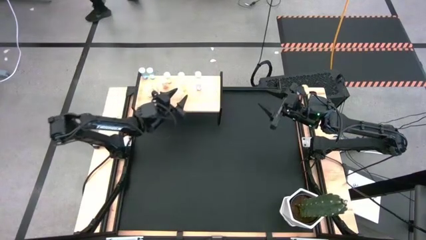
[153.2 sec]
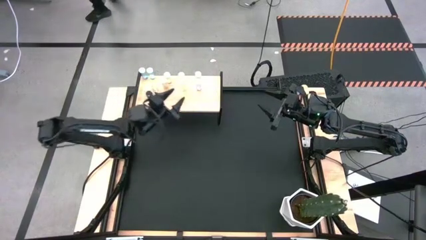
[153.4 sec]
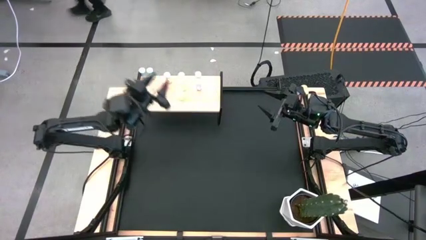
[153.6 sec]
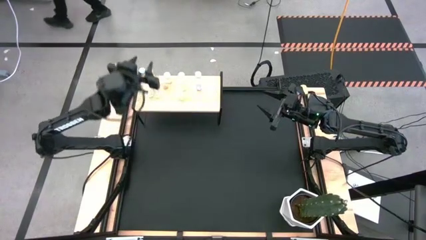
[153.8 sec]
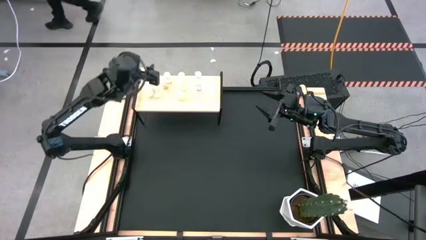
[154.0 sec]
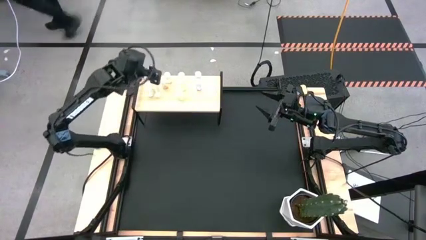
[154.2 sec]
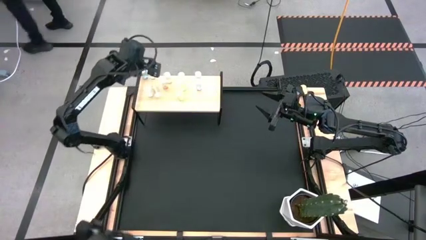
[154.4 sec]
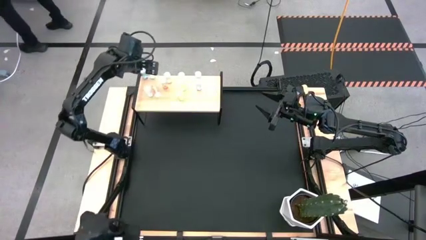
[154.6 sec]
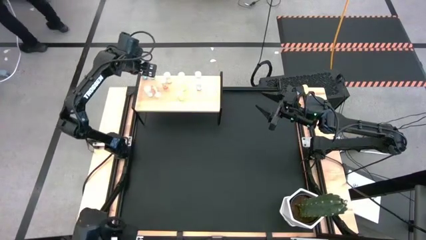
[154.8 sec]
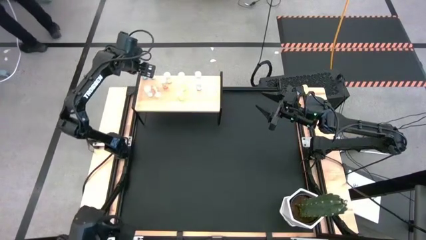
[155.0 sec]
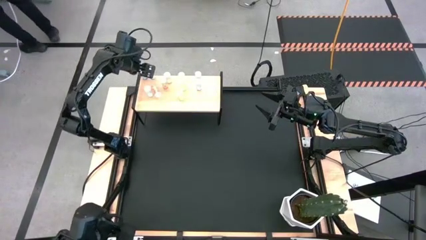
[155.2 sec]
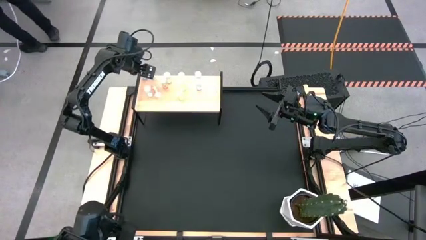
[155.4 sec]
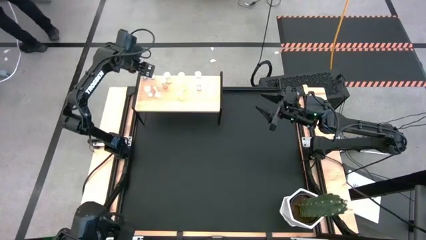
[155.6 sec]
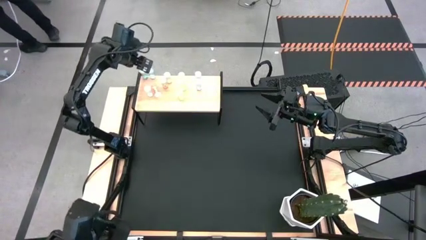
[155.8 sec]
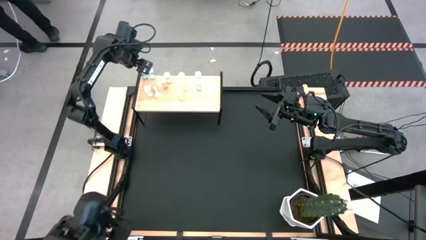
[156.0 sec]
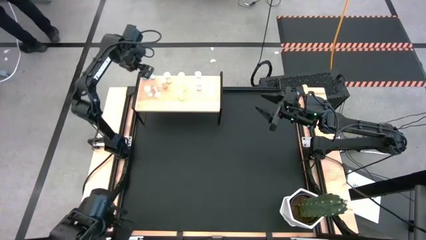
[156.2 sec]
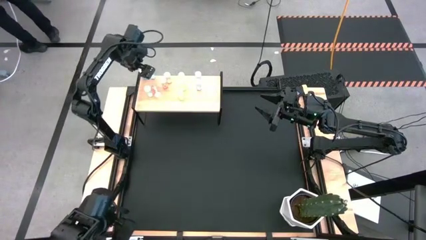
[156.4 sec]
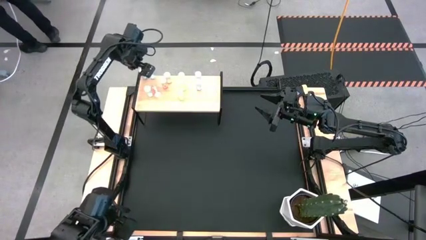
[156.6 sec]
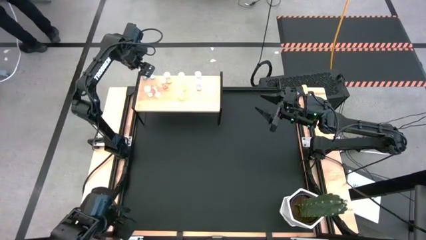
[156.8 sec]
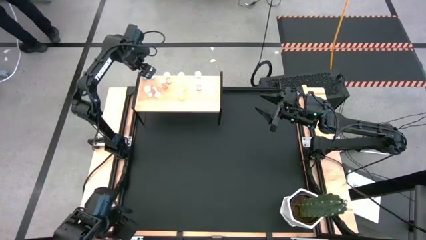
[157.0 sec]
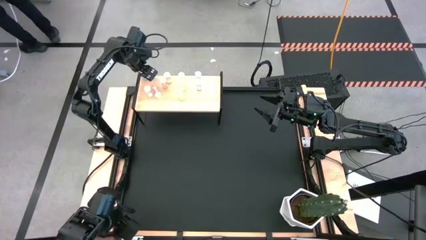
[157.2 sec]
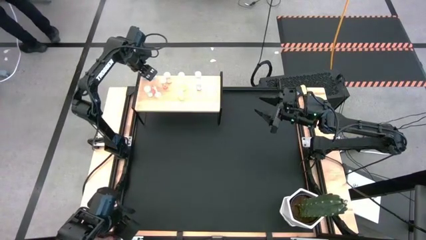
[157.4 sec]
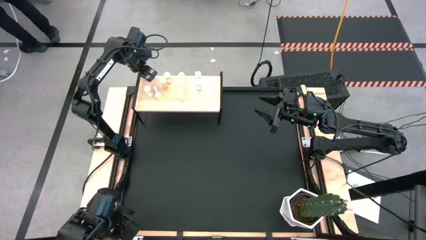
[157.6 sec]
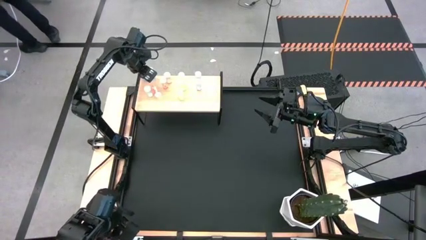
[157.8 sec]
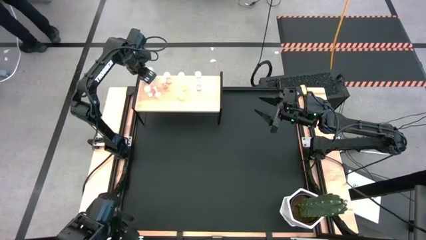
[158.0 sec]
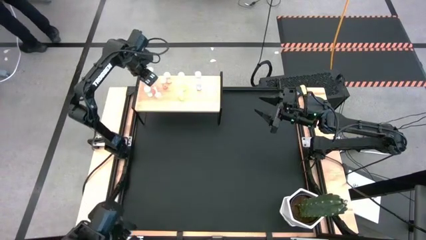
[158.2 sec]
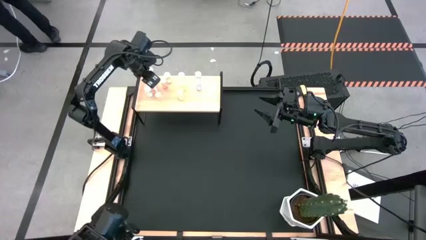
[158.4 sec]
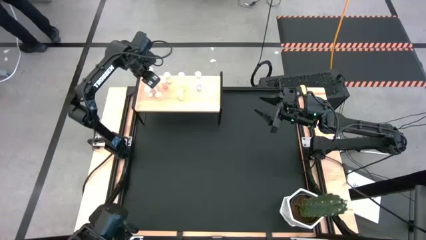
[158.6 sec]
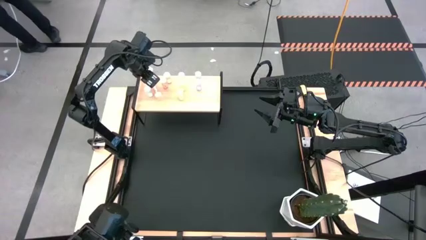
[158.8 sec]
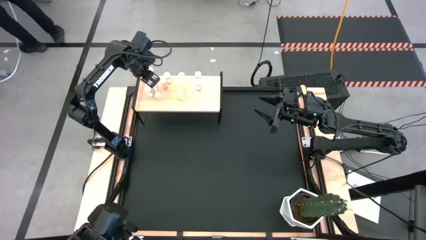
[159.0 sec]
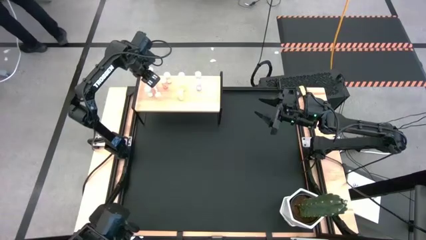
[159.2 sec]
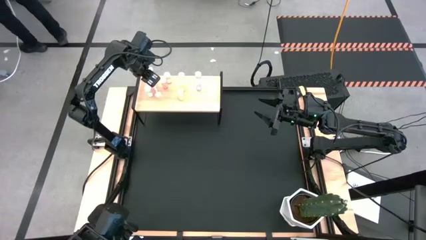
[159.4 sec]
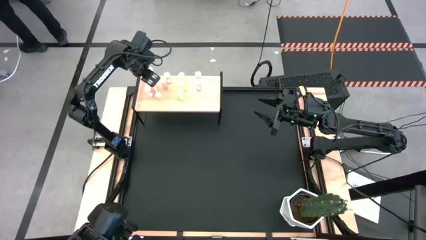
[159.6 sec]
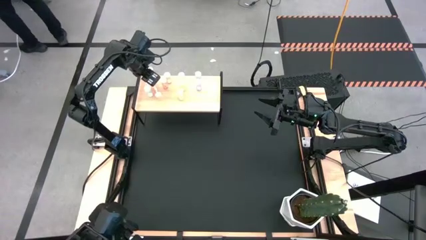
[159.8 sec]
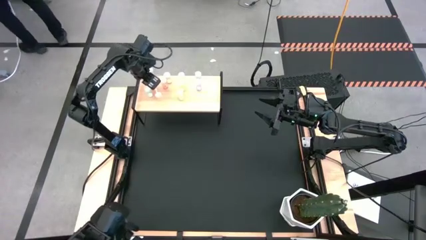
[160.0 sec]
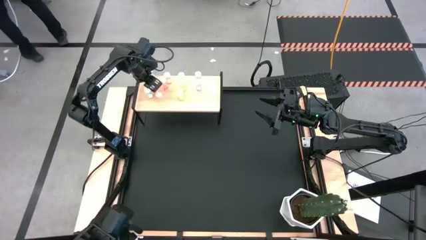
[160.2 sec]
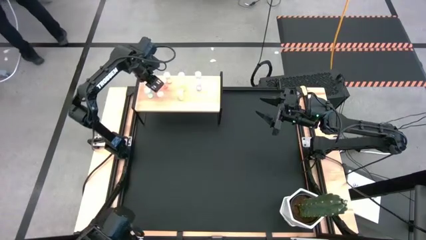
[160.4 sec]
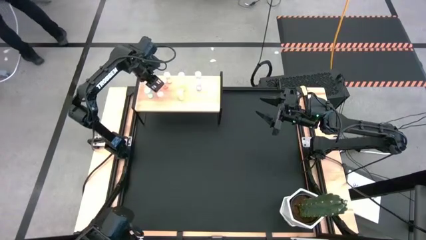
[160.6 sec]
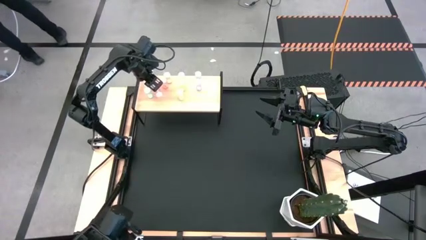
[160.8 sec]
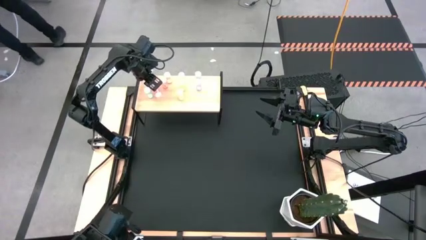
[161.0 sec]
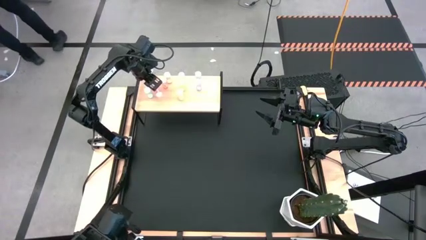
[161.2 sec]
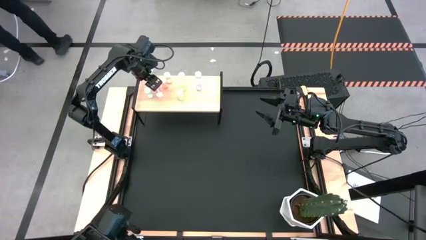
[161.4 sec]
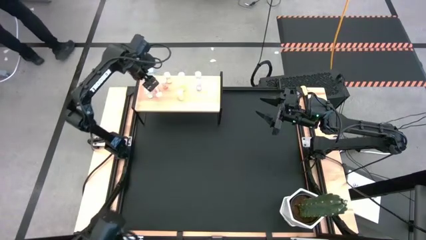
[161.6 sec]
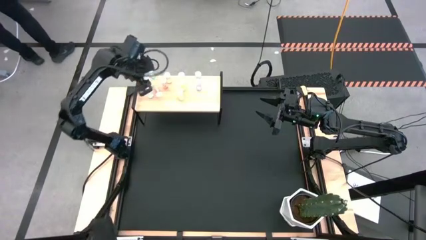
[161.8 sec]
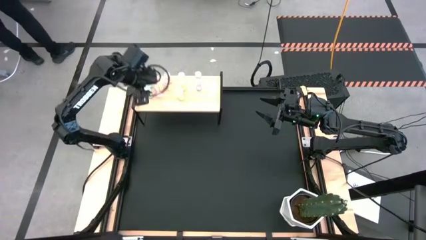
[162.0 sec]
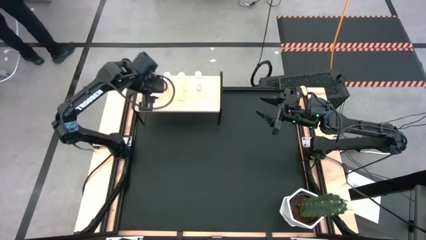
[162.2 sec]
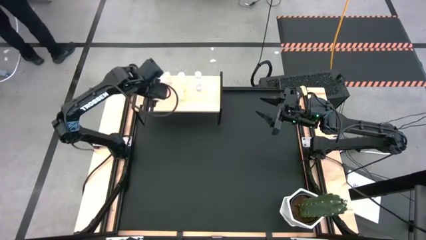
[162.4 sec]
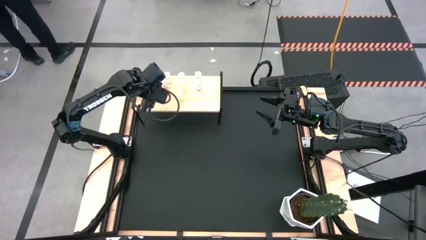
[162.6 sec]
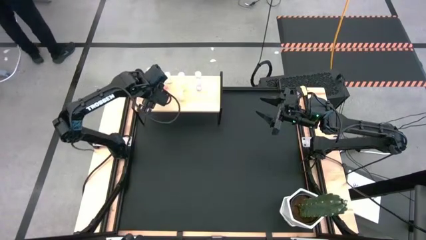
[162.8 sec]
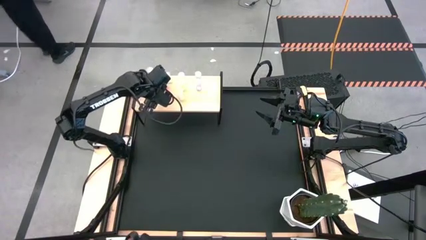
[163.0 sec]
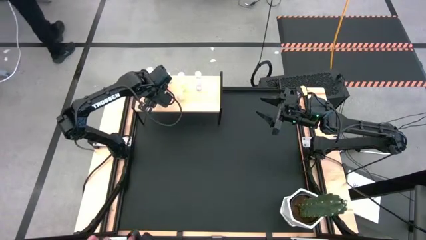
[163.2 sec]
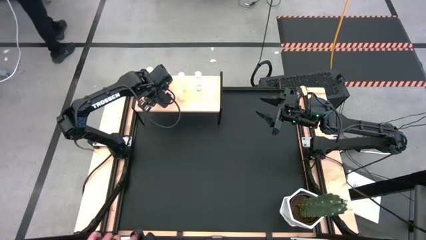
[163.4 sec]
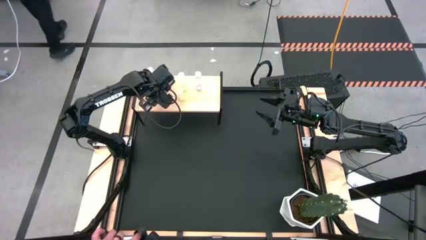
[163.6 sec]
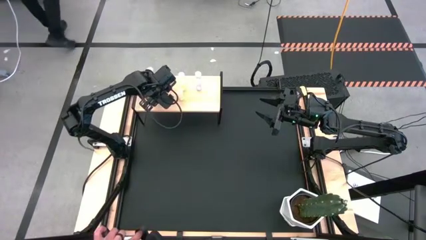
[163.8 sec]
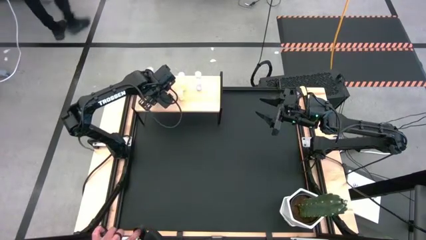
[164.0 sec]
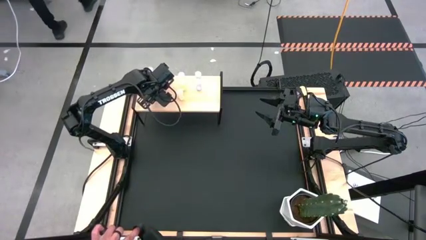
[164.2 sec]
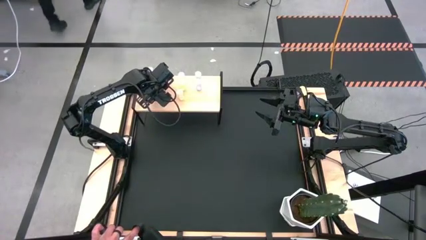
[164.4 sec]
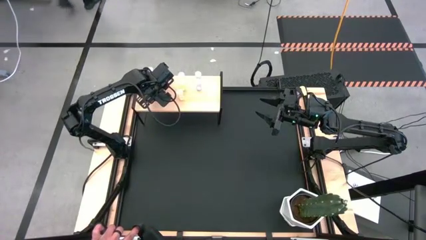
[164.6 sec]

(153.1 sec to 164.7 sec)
Task: Pick and place medicine bottles onto shelf by color
Adjust the pill bottles on the shelf

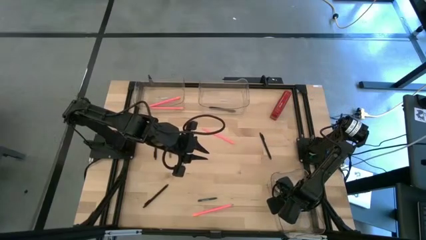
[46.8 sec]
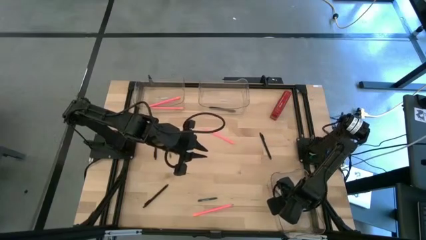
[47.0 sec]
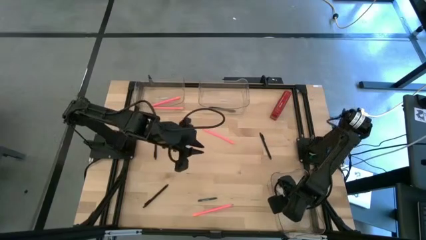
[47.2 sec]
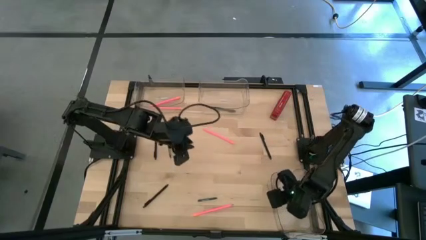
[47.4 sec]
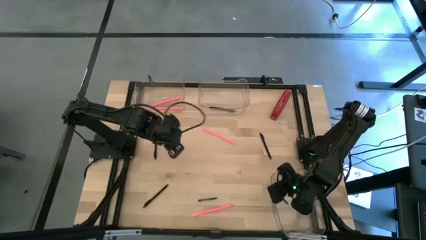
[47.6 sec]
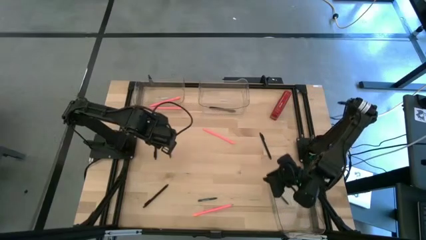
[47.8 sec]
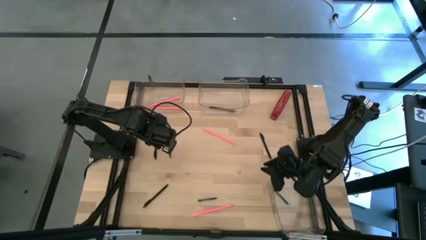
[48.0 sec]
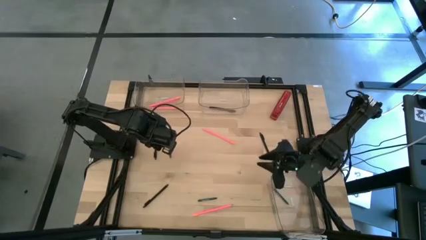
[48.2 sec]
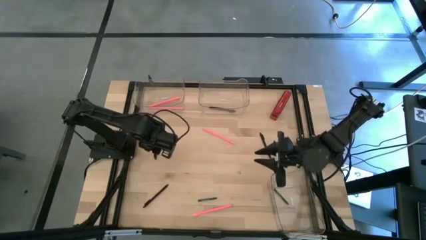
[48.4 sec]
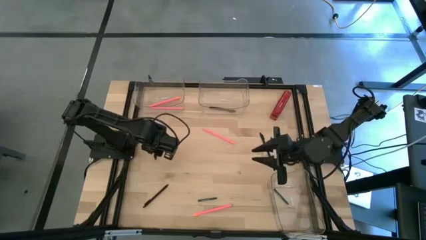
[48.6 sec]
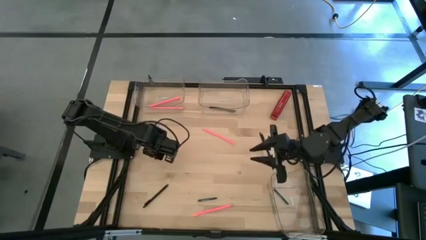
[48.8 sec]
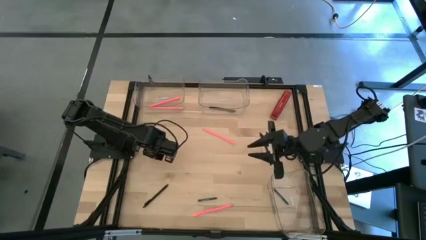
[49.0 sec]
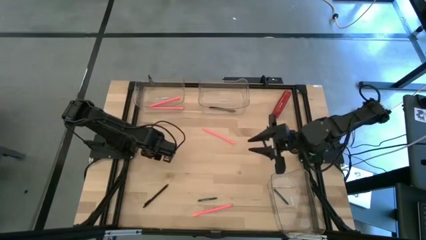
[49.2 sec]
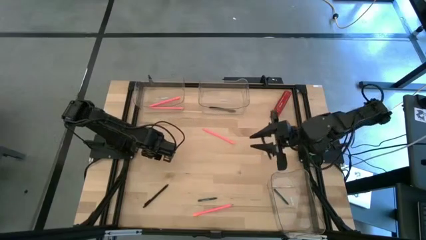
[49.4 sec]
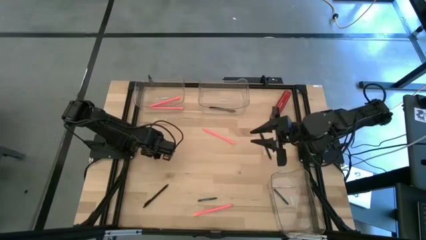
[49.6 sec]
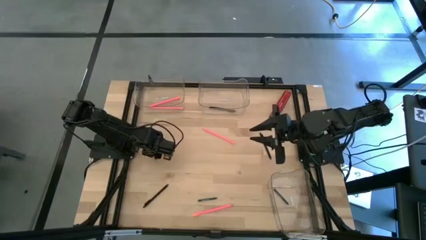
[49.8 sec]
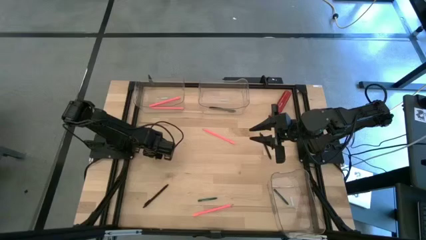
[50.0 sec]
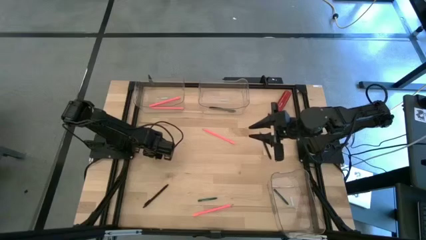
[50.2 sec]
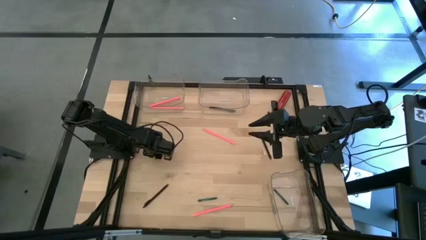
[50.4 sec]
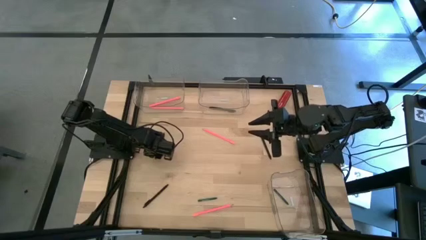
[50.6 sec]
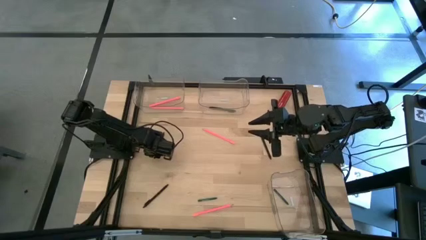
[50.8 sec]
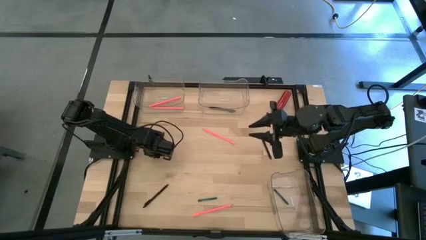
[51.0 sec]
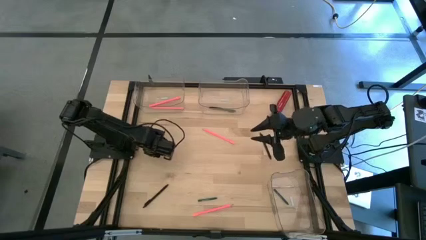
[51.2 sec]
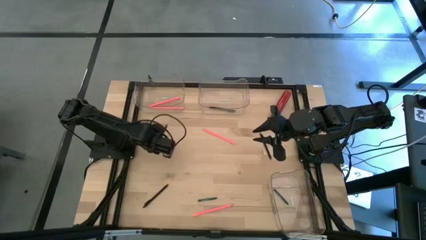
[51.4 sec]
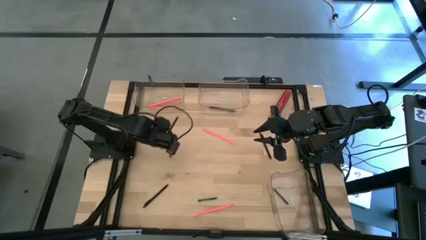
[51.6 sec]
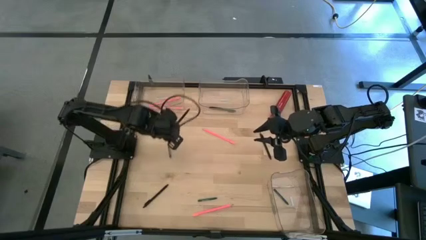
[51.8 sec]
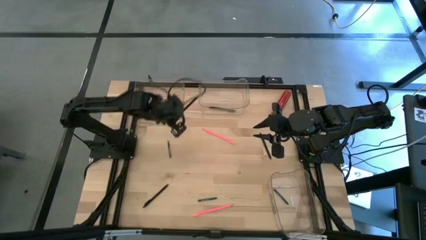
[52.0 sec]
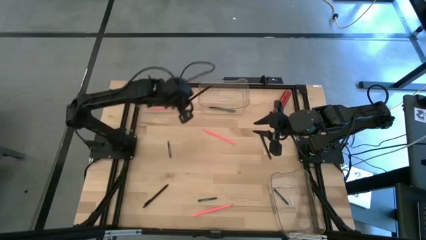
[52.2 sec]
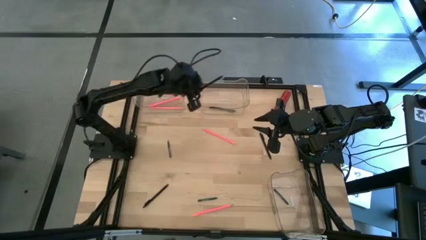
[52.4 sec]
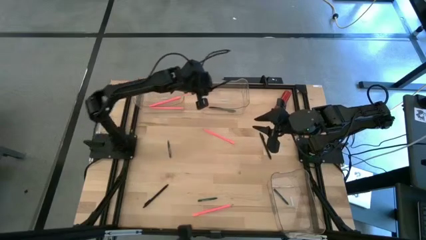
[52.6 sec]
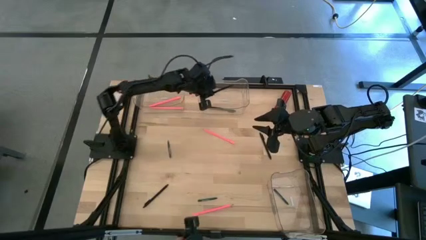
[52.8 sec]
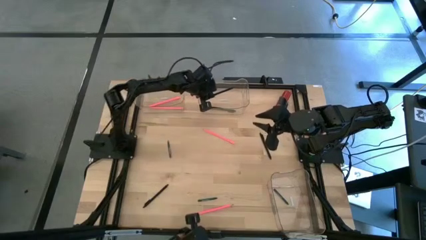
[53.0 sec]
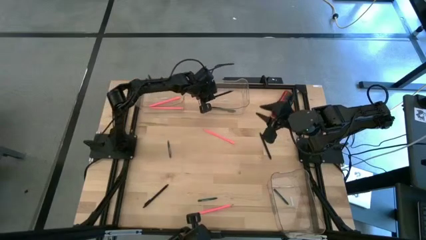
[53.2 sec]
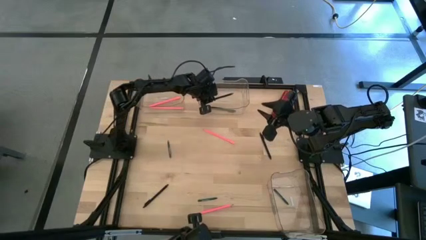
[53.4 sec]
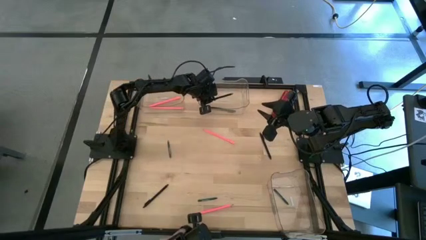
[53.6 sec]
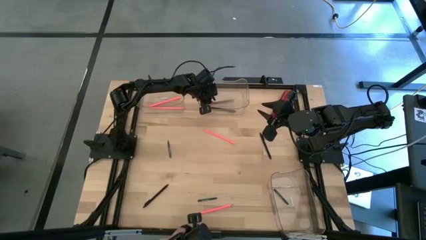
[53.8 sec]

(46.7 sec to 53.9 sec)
Task: Sort crayons/erasers/pens/pencils in bins
Put the black pen into the top right transparent bin
